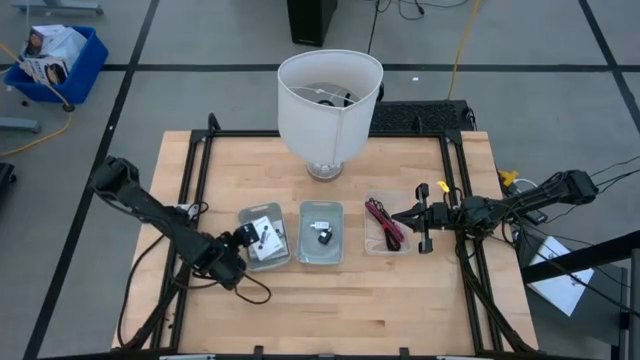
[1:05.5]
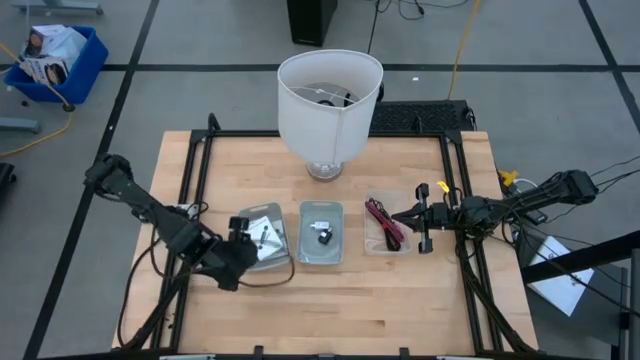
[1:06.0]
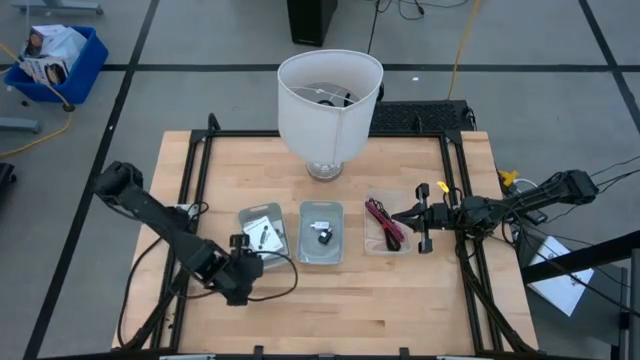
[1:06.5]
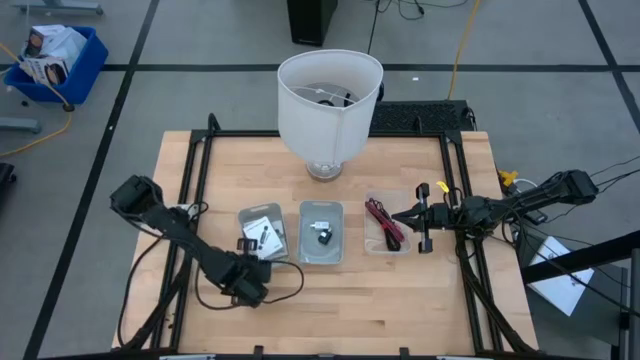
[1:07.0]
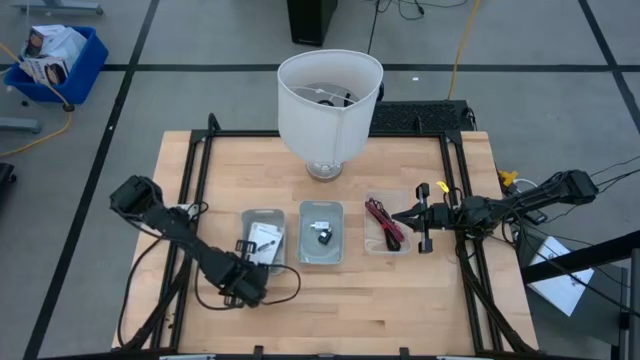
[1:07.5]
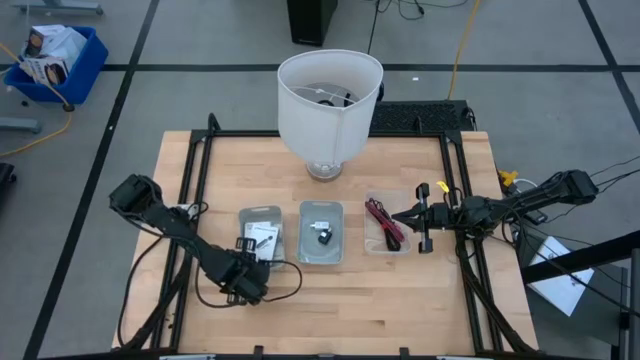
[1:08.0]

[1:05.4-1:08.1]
Task: Pick and place items into bin
Adjust the left gray bin

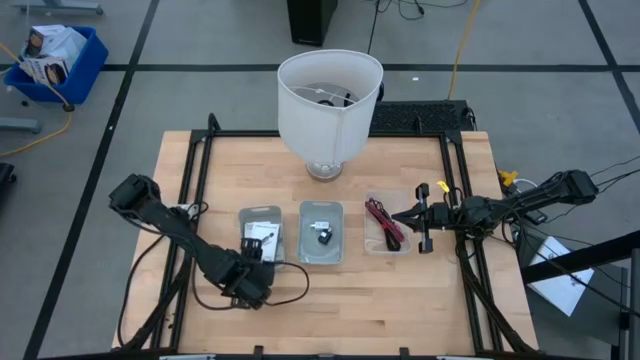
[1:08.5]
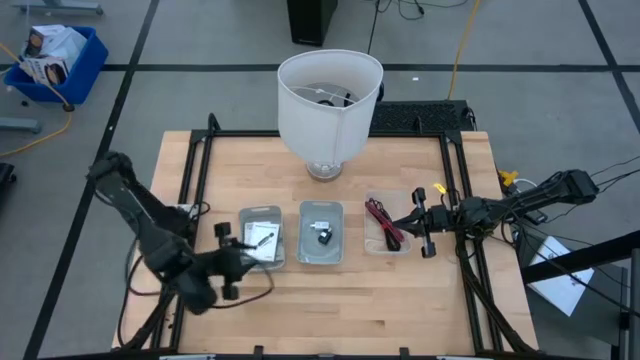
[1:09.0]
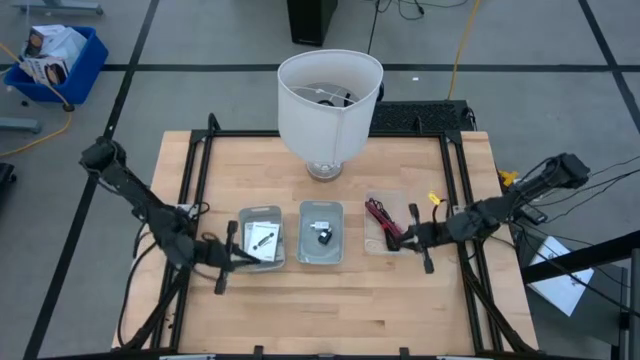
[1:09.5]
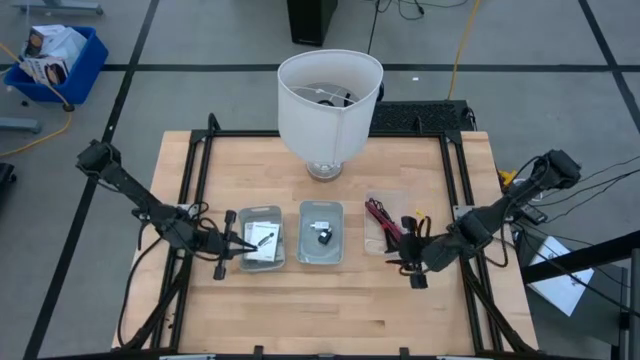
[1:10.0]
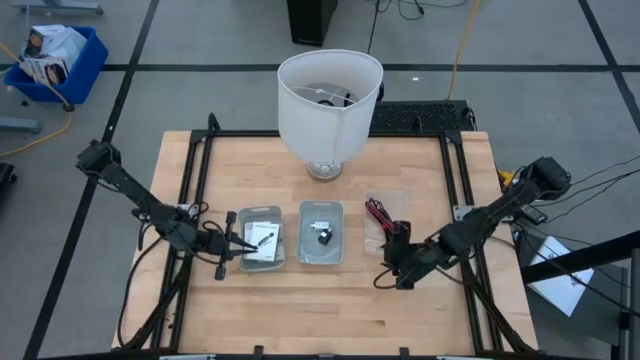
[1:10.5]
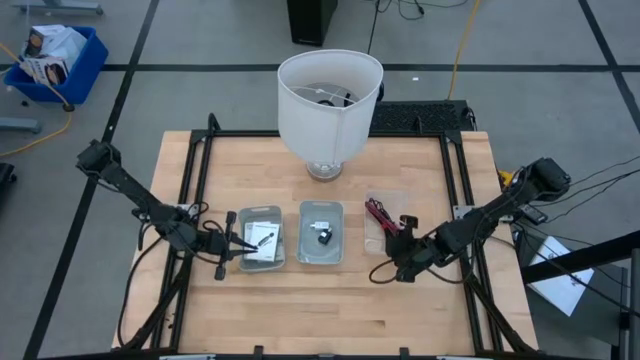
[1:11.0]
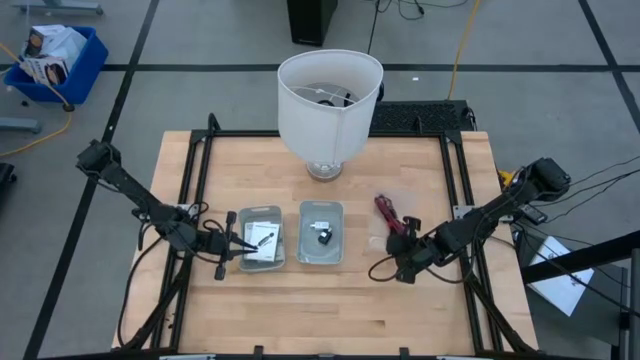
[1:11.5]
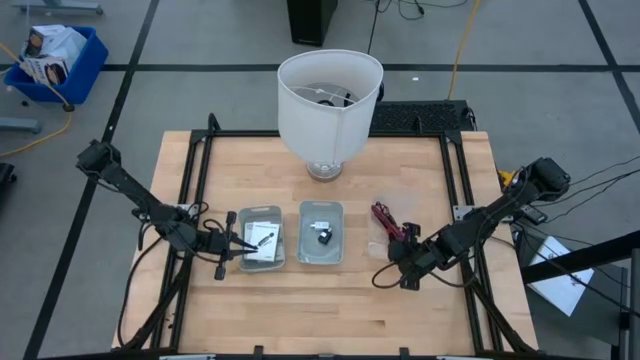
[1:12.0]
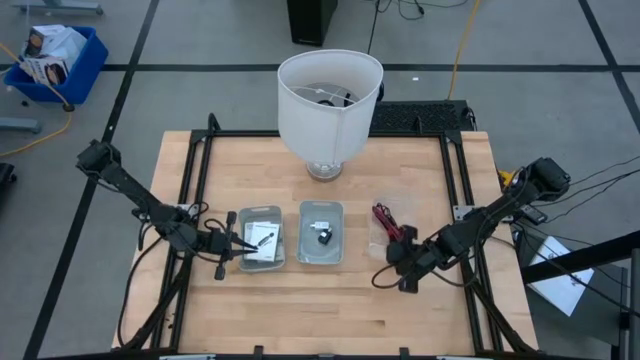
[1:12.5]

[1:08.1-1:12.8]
Adjust the transparent bin

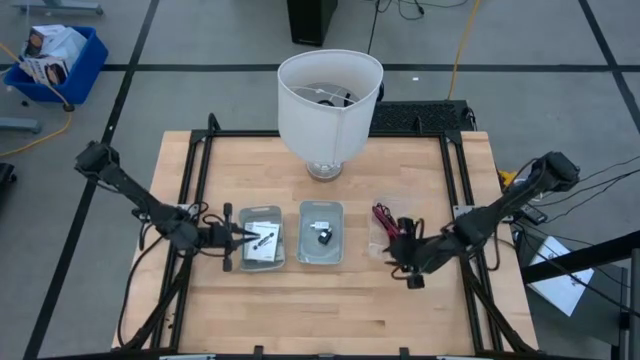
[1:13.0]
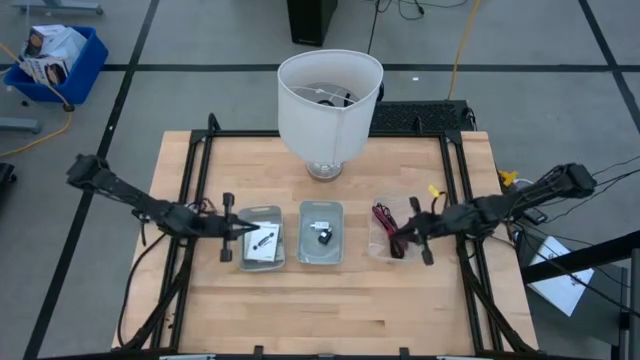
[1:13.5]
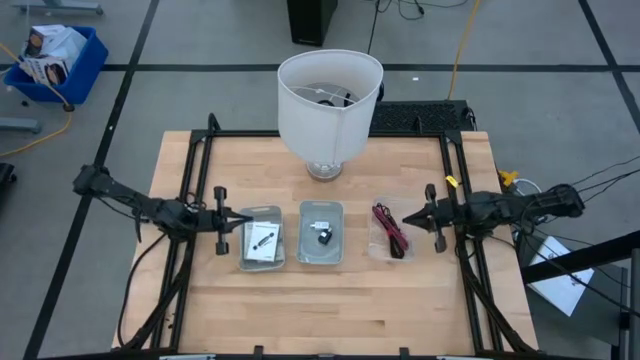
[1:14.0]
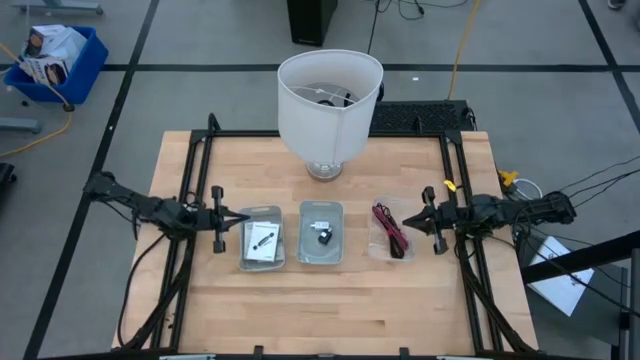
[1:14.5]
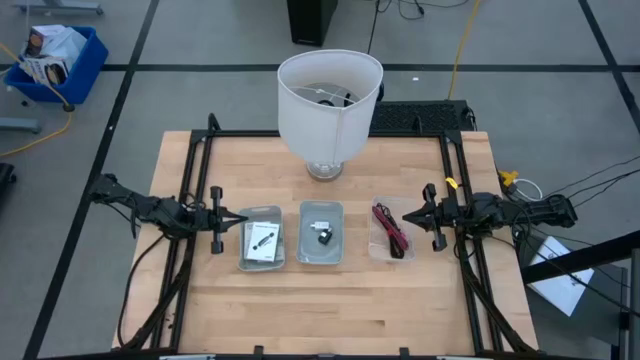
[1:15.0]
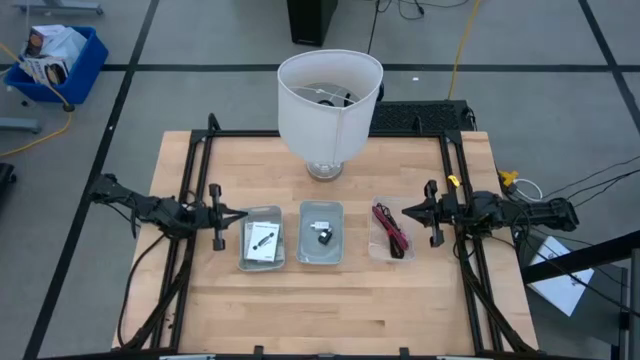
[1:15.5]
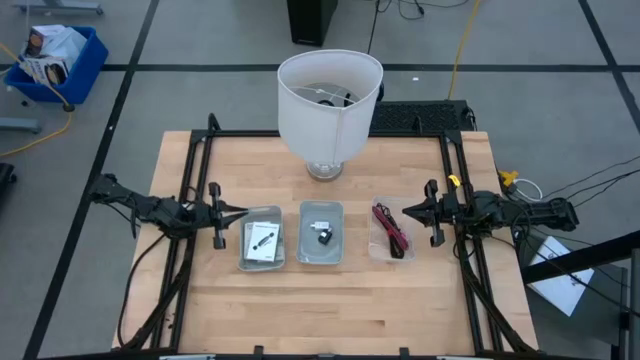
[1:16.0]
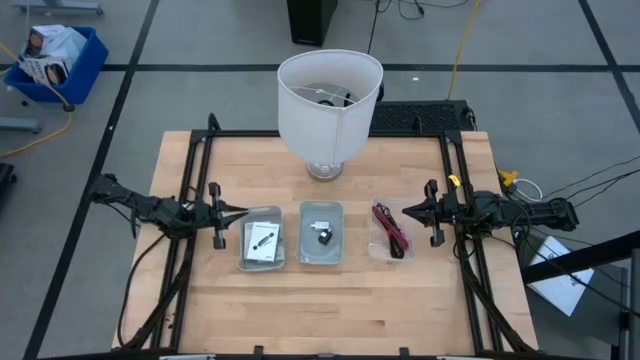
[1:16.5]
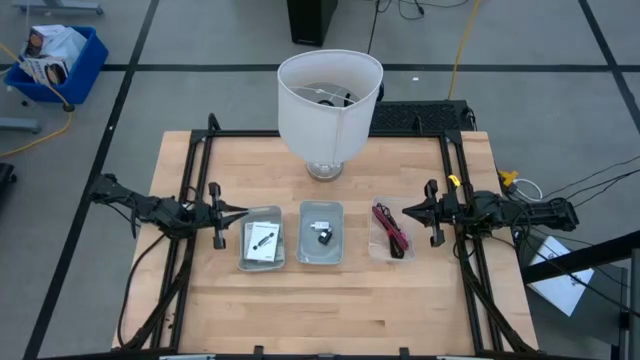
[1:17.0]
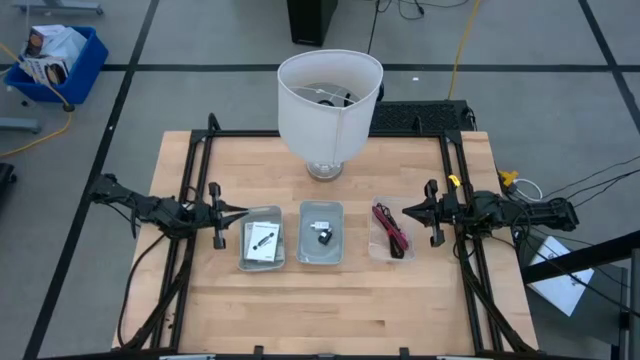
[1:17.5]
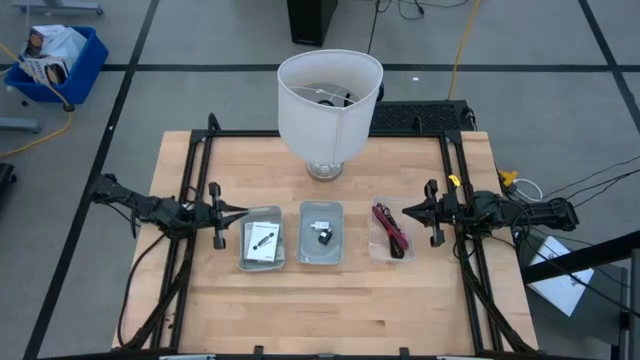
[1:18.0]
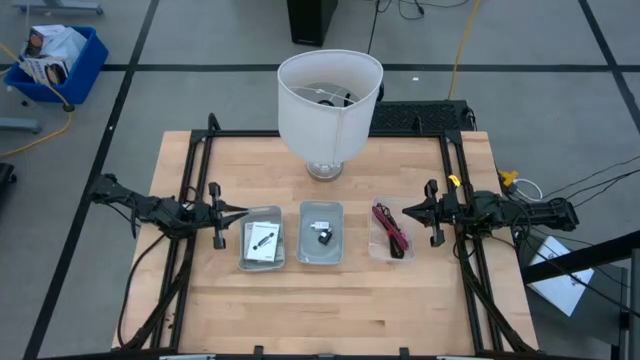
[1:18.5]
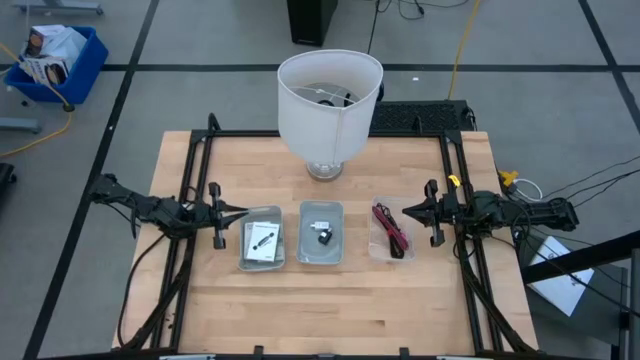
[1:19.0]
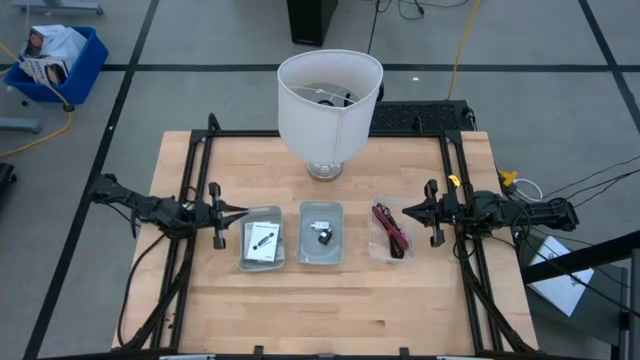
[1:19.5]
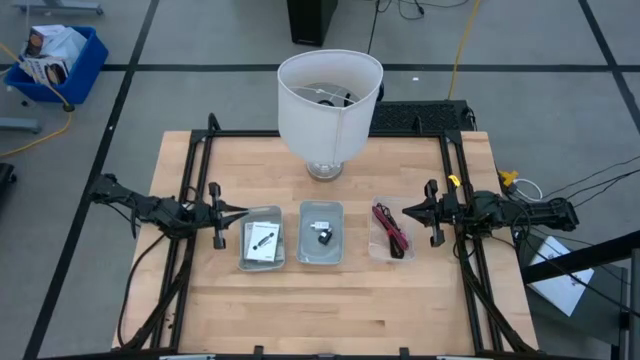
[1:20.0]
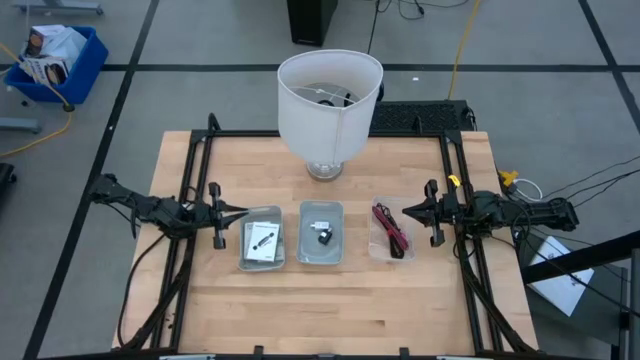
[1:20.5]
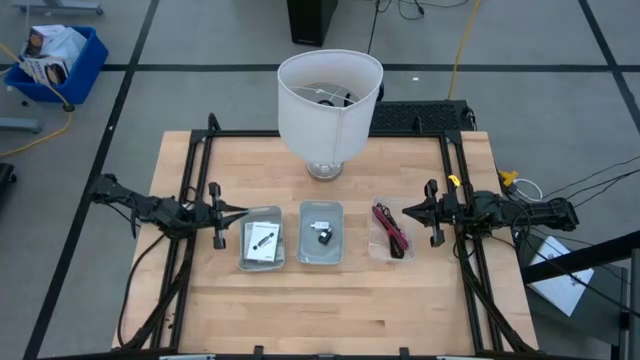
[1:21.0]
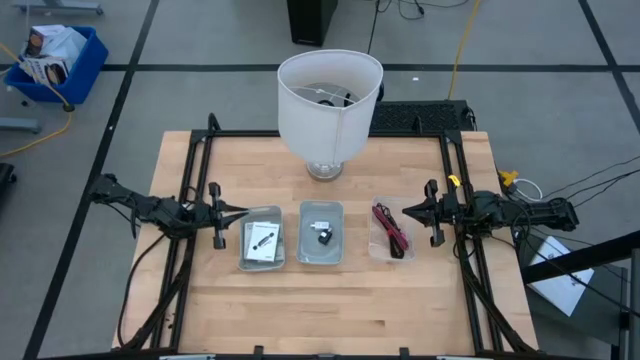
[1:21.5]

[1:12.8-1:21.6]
Return to Home Position

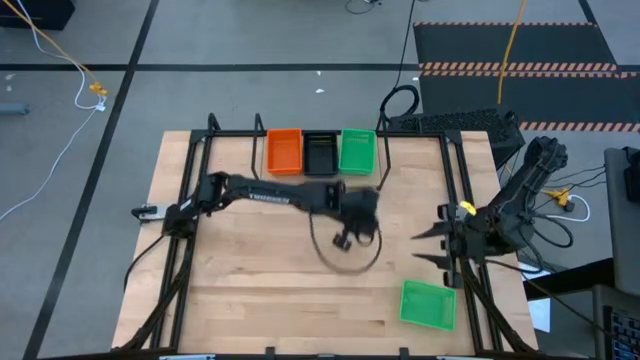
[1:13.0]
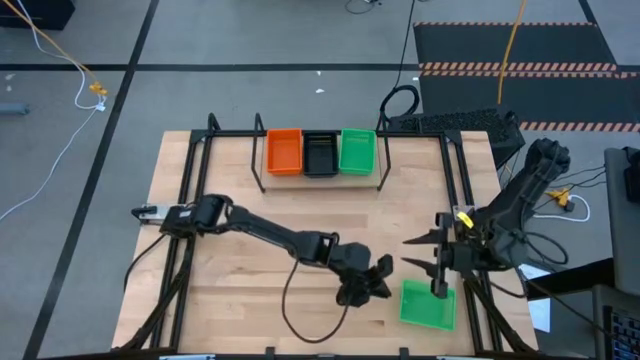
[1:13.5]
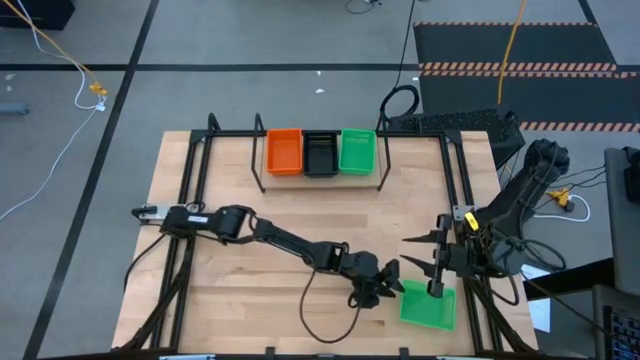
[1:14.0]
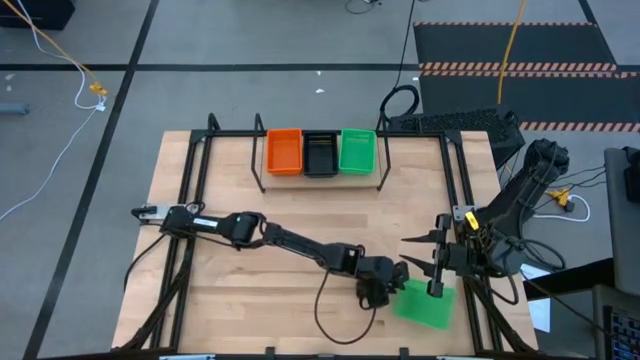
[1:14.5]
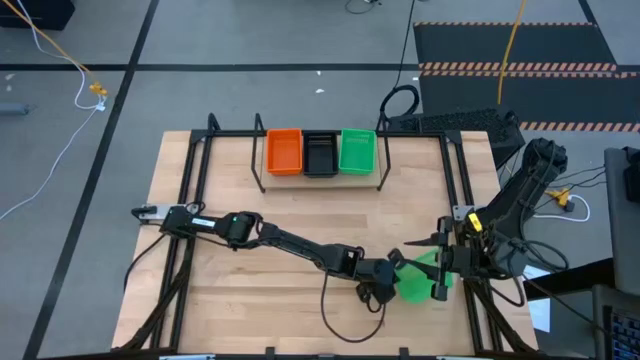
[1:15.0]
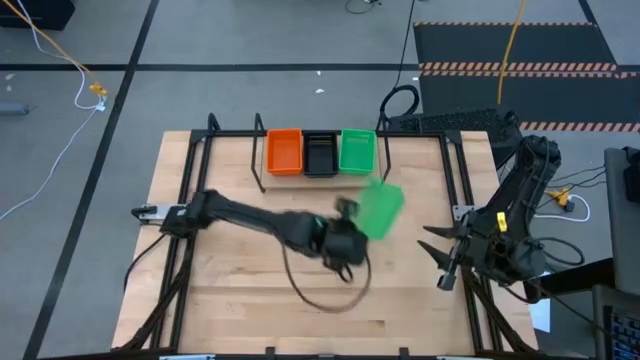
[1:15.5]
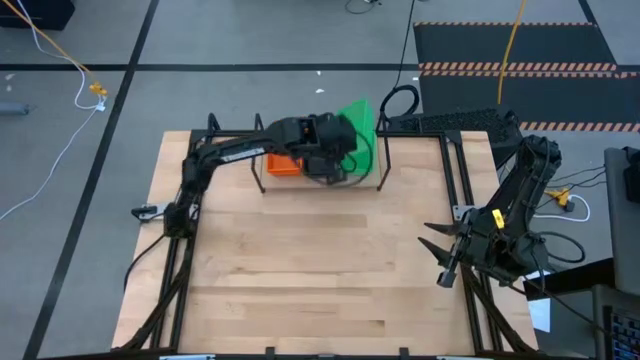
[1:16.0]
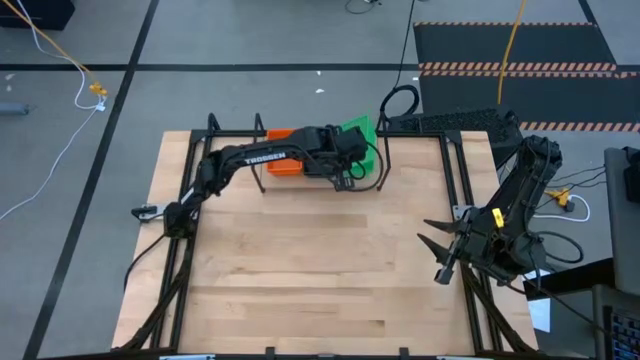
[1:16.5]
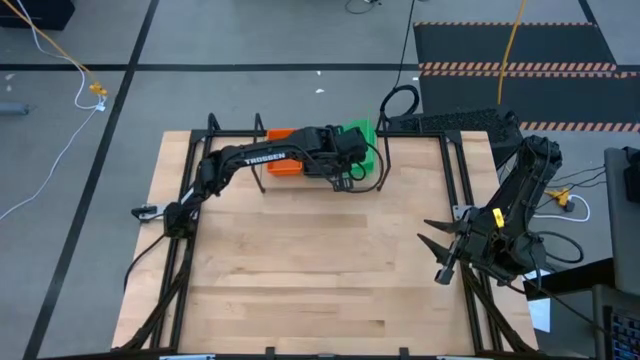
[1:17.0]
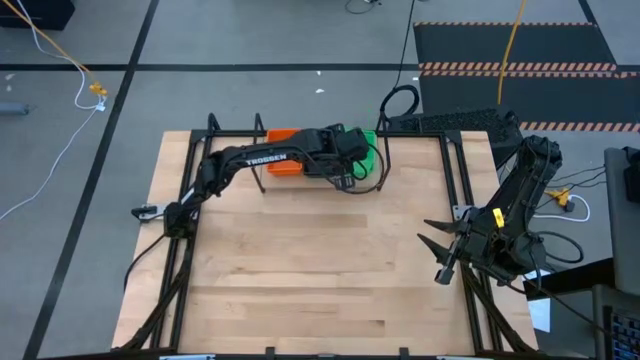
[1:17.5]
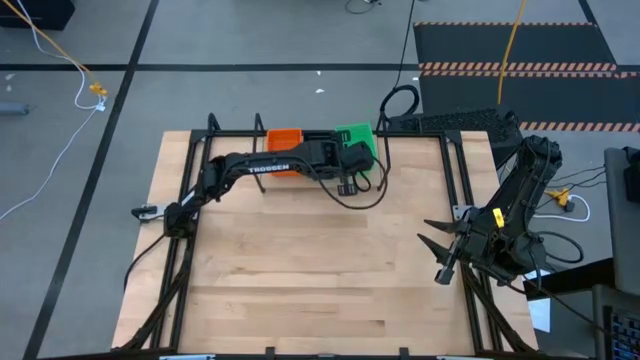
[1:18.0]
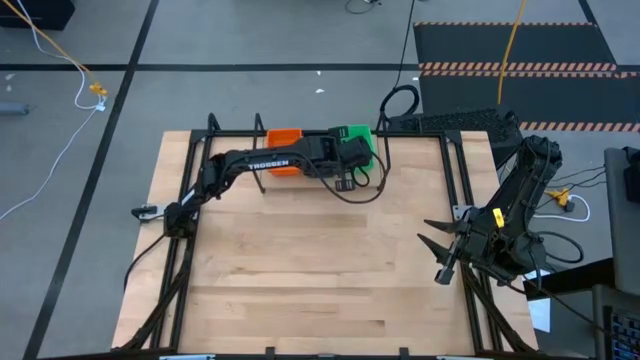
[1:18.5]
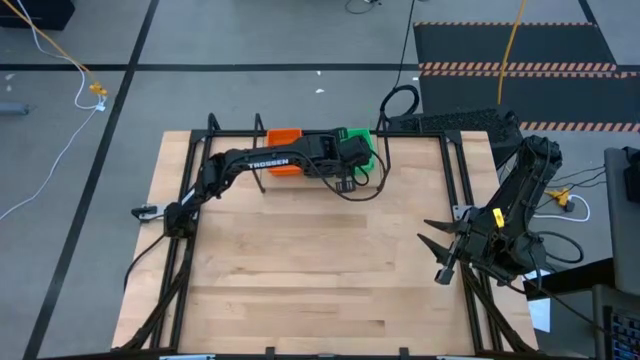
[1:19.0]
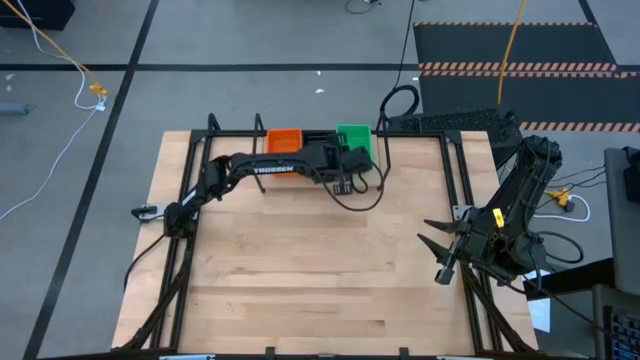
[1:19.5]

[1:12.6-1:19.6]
Task: Stack baskets on shelf by color
Stack the green basket on top of the green baskets on the shelf
